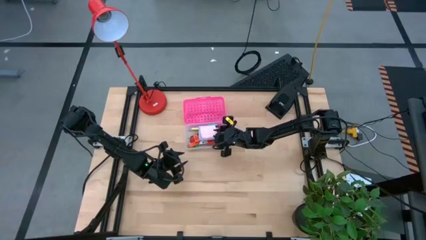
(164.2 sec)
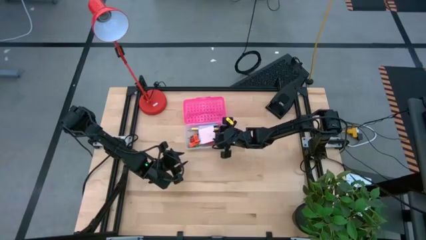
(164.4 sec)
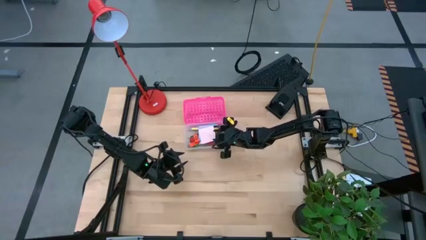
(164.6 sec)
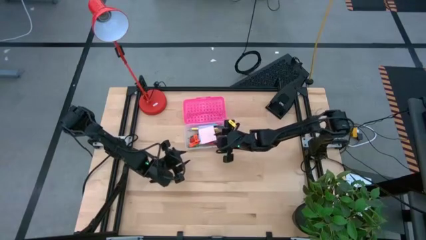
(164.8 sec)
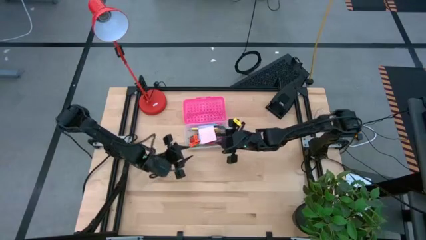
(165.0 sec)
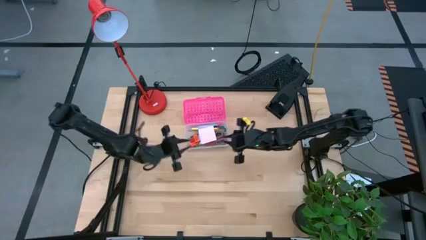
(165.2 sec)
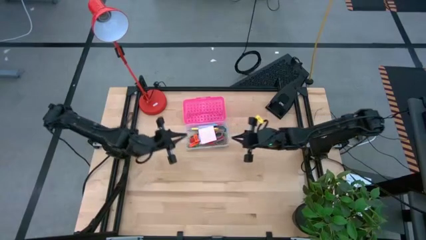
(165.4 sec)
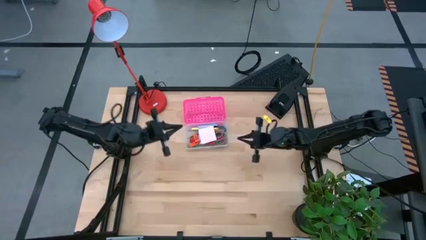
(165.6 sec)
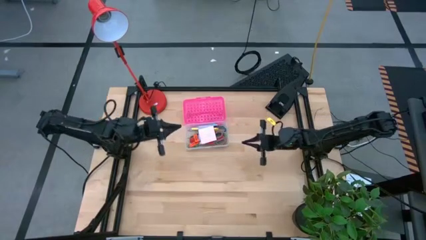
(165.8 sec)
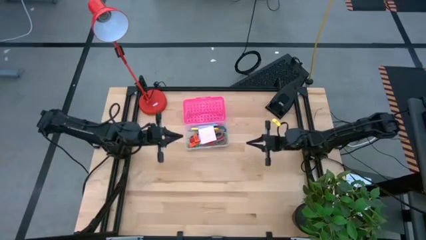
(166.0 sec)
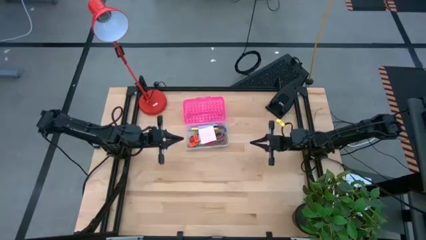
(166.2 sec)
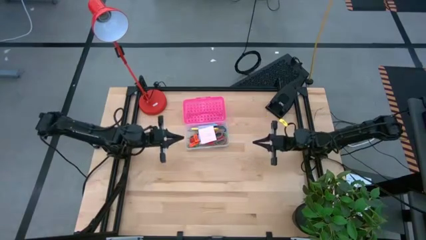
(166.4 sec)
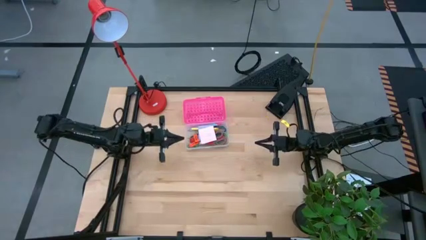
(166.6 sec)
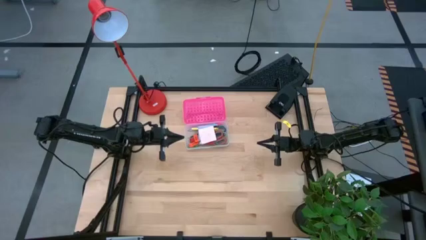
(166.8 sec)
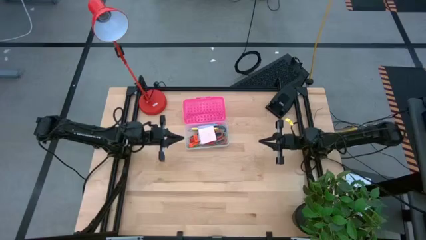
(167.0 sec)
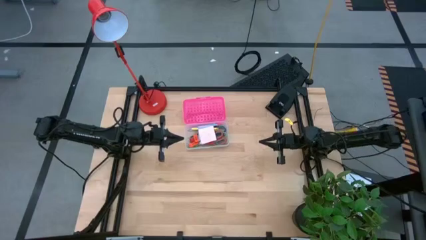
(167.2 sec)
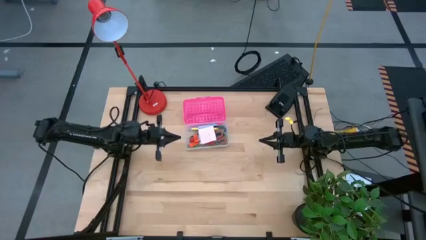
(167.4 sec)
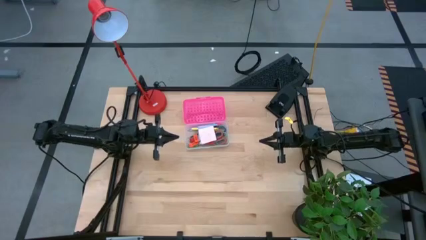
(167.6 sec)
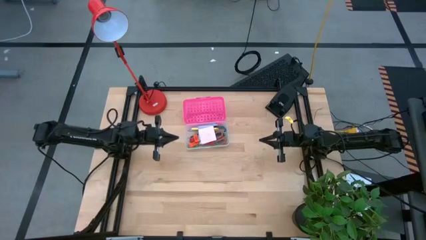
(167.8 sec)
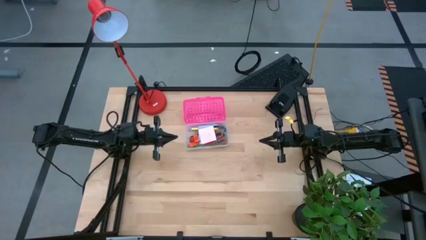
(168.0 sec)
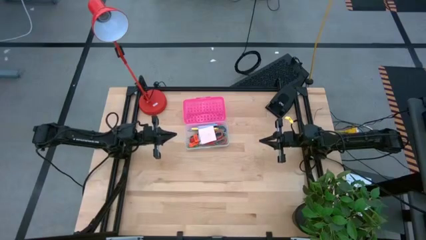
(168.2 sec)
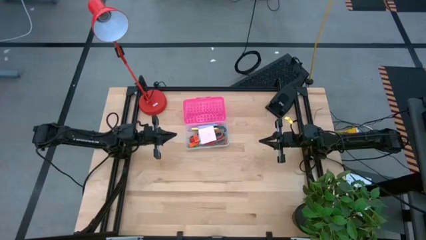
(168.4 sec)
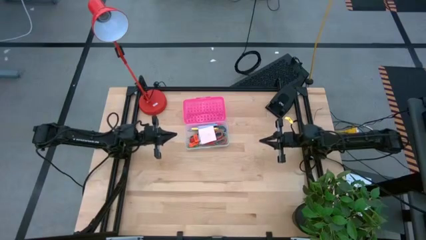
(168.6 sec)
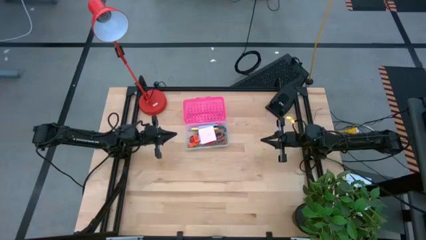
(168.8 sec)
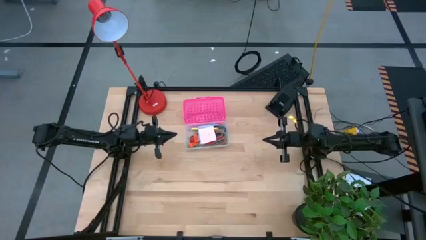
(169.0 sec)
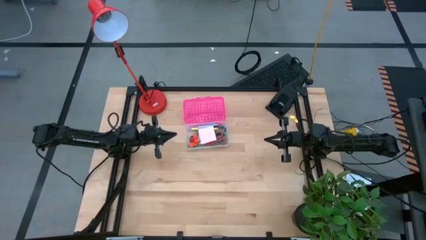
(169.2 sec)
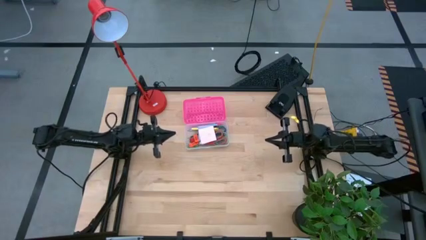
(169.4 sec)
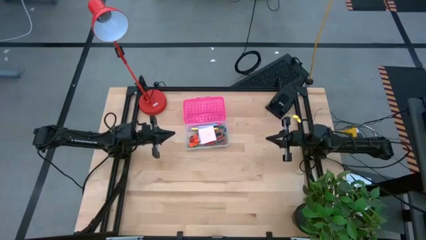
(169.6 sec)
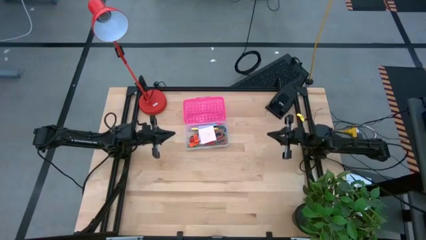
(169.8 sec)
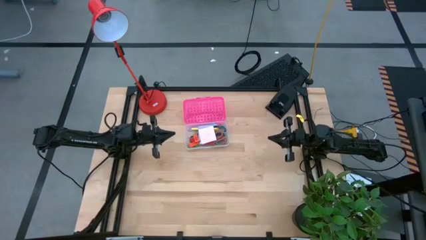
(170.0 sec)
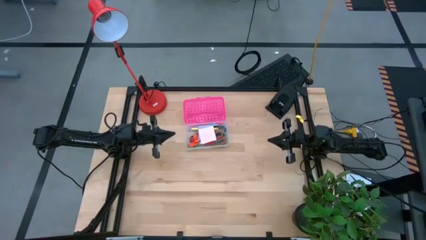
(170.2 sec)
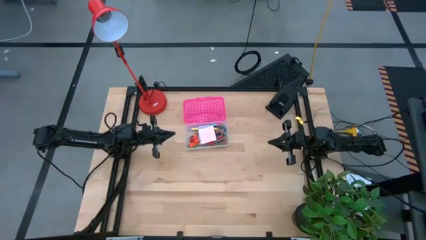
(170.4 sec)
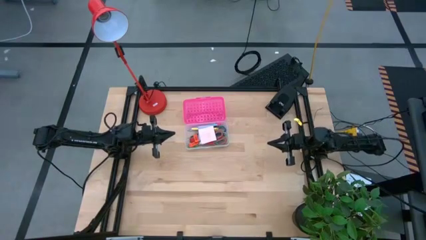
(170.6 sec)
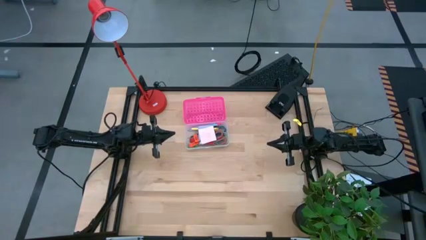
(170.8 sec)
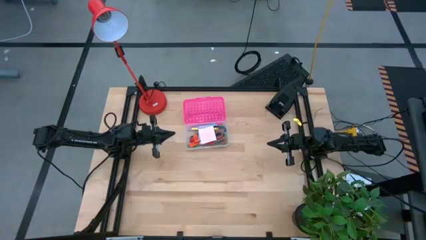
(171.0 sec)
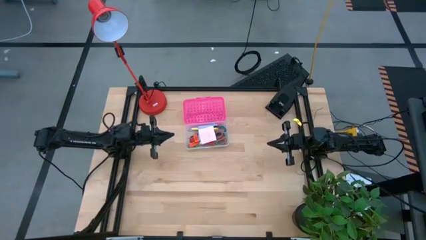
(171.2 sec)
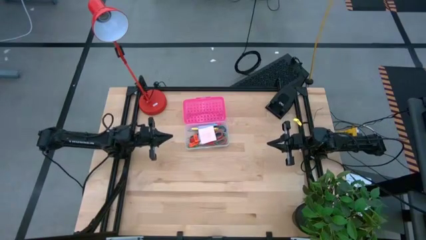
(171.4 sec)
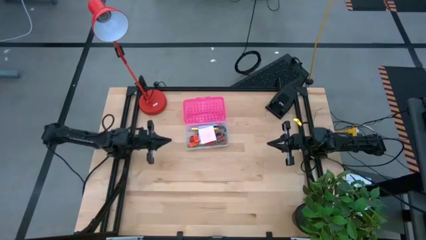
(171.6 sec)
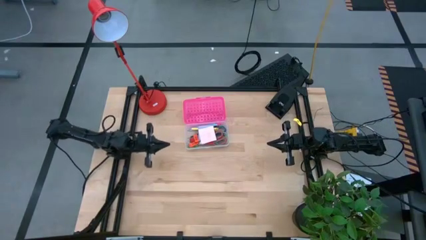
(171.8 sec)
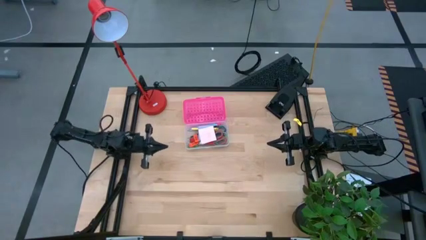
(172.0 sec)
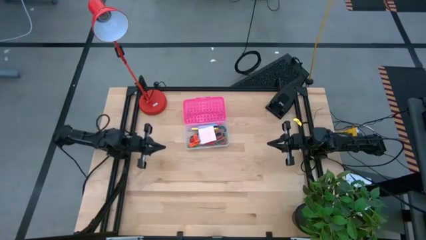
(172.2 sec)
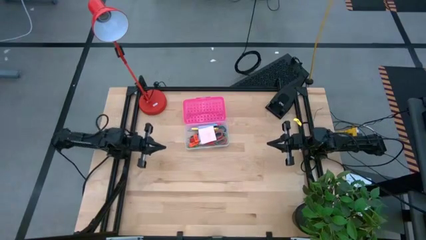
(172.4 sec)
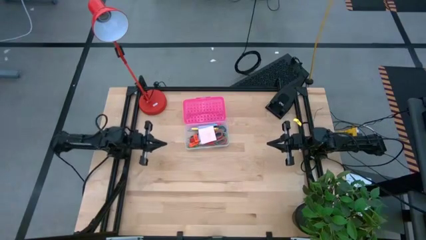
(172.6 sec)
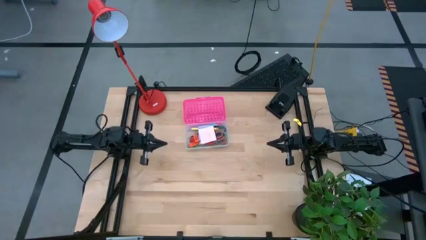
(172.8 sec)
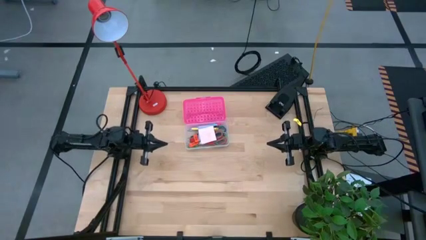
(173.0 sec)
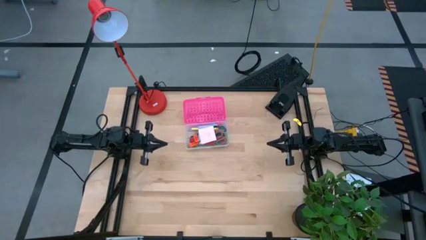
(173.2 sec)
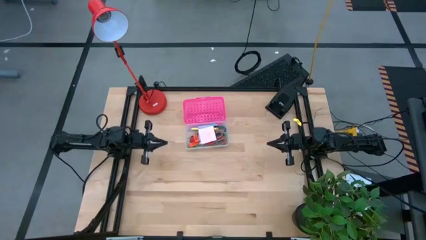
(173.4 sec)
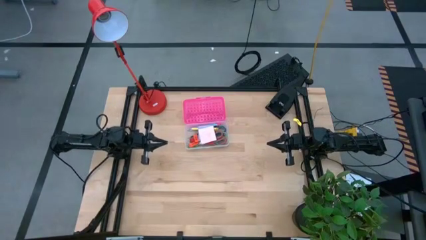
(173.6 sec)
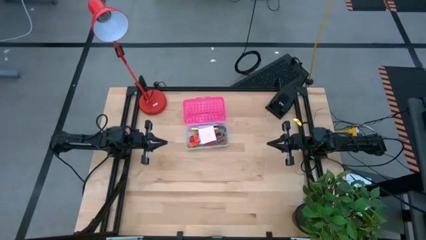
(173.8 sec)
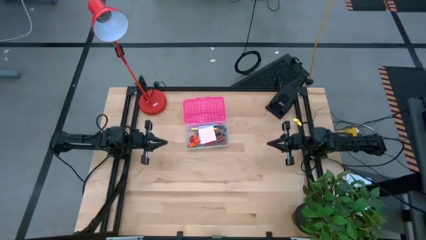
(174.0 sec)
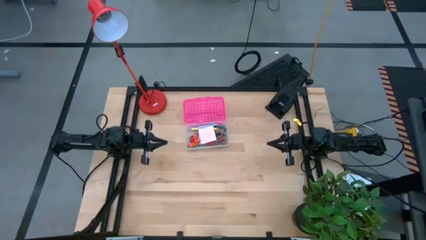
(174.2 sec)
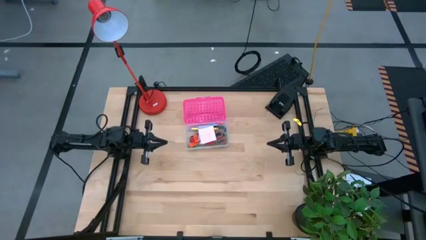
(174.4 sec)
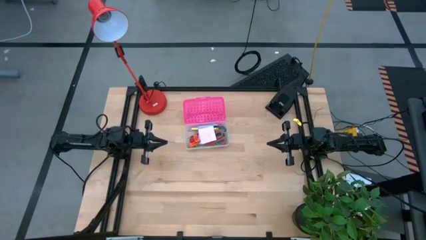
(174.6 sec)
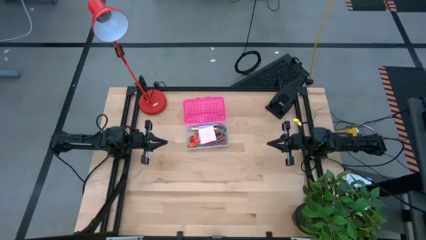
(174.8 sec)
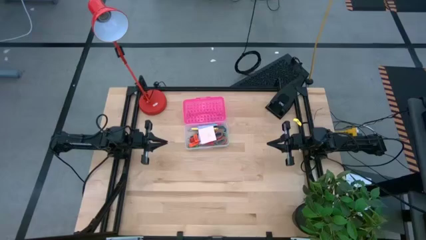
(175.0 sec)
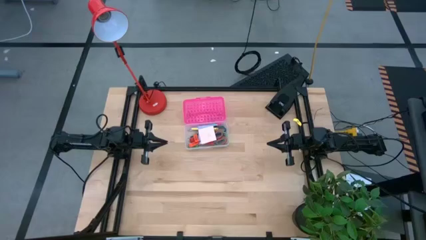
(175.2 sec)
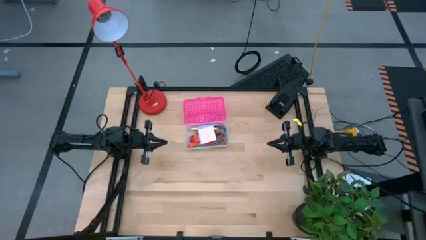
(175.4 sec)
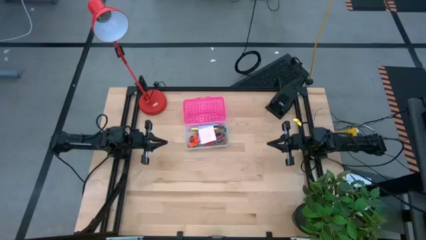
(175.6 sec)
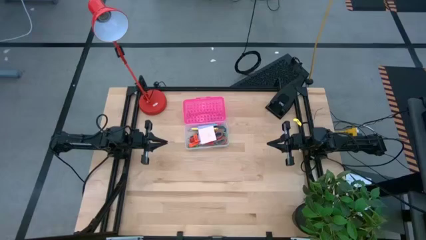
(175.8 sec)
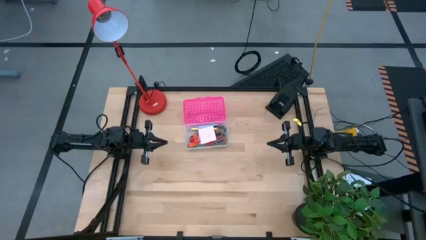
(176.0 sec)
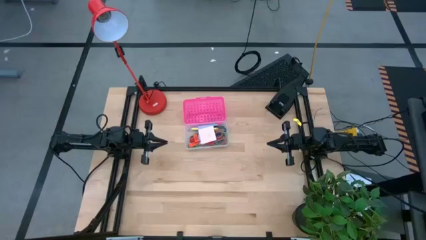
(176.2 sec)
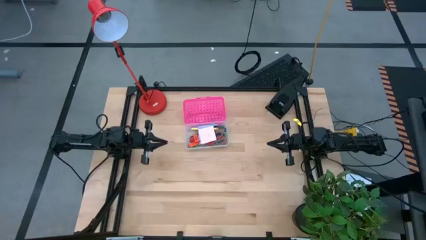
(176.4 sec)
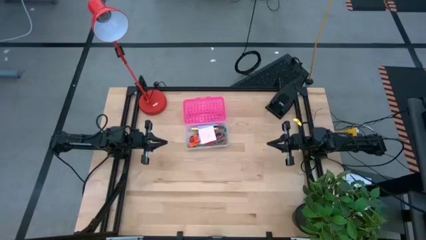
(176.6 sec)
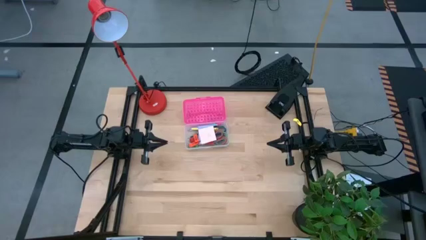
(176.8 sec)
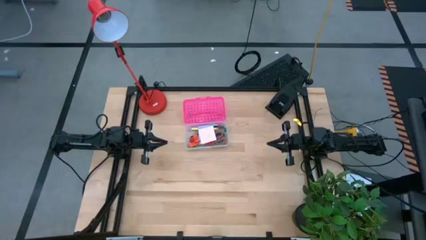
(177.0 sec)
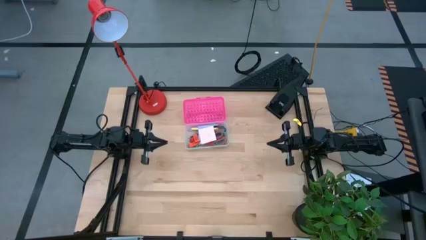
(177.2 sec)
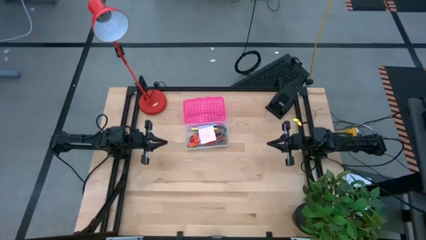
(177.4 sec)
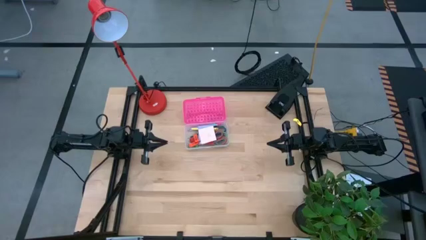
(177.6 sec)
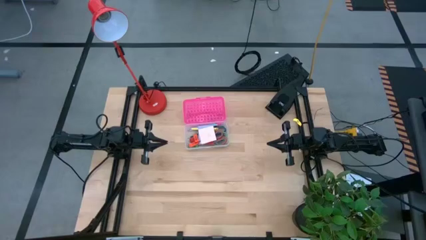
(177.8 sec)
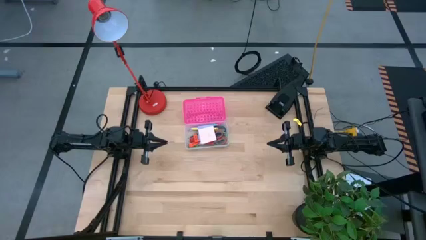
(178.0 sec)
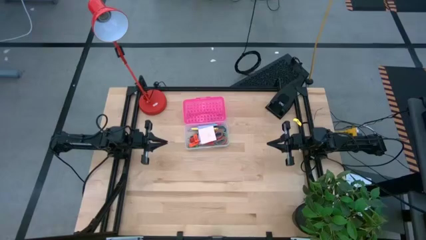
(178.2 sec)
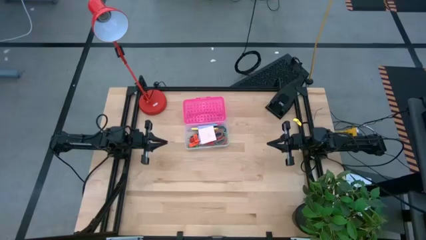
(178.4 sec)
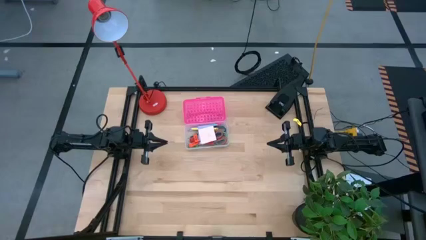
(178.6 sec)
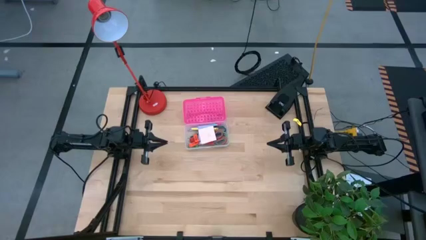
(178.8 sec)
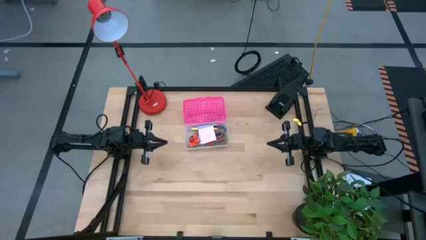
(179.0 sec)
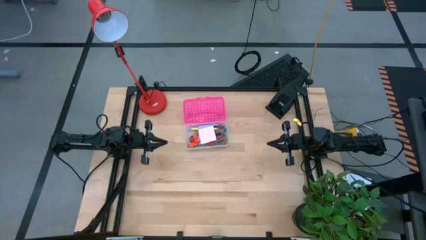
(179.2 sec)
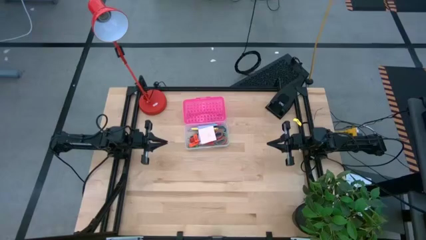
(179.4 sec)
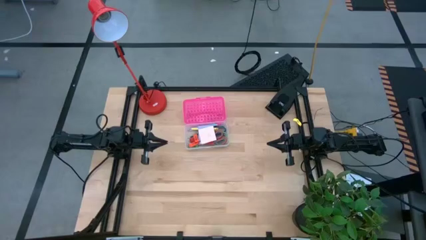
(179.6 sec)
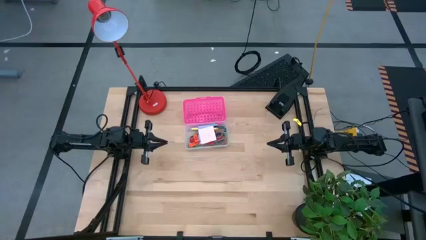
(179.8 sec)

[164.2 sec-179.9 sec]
Task: Pack school essentials
Return to Home Position
